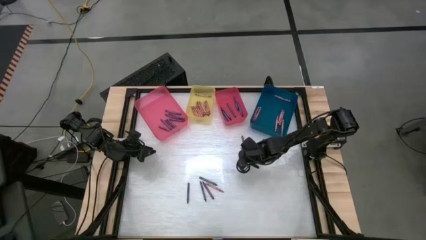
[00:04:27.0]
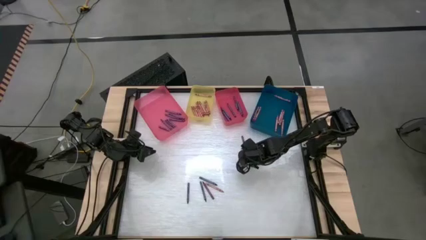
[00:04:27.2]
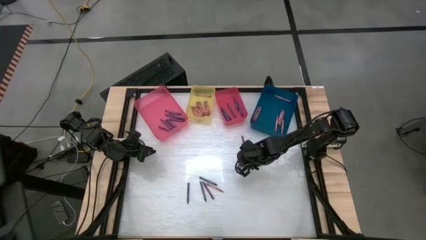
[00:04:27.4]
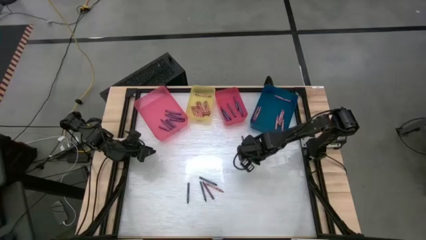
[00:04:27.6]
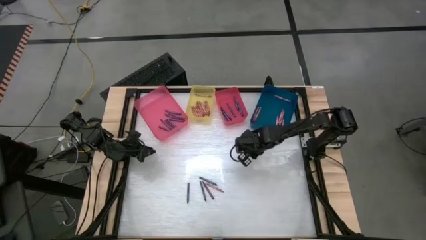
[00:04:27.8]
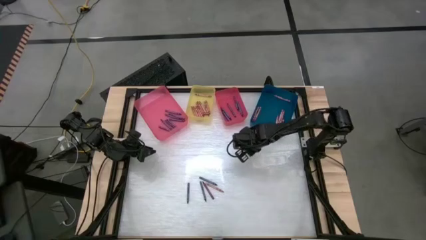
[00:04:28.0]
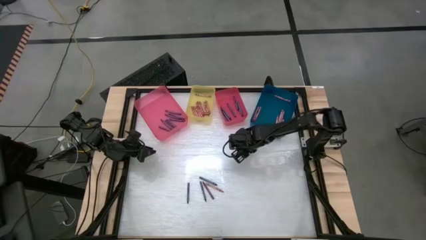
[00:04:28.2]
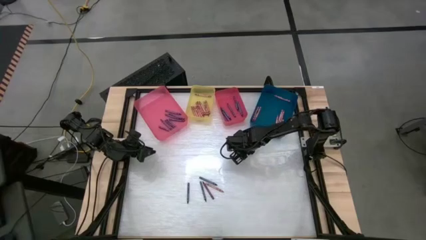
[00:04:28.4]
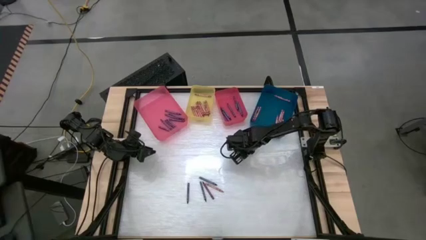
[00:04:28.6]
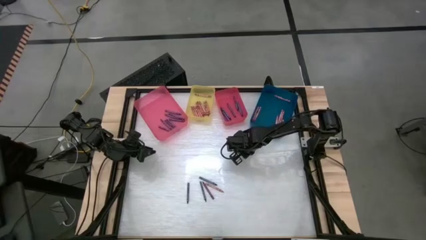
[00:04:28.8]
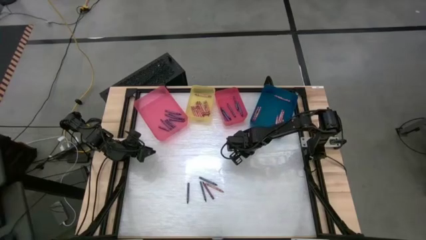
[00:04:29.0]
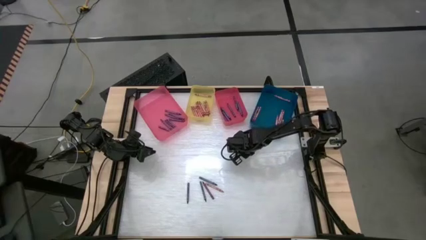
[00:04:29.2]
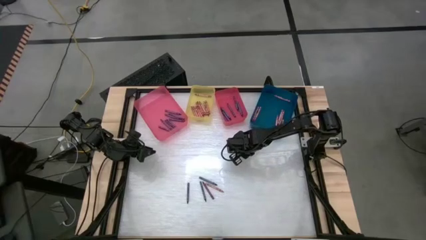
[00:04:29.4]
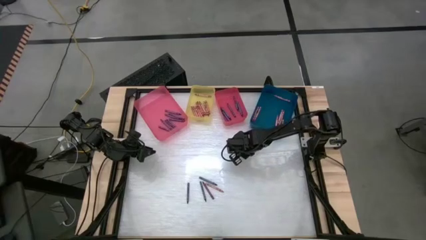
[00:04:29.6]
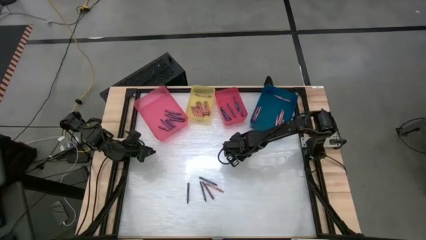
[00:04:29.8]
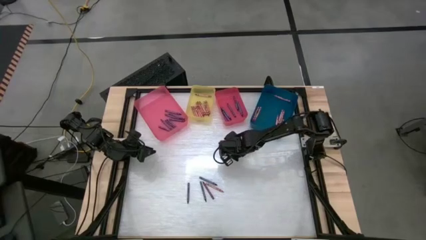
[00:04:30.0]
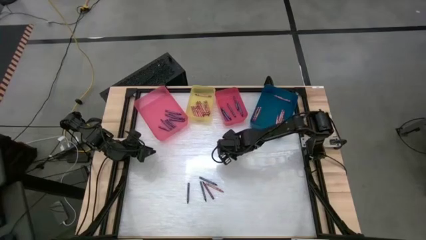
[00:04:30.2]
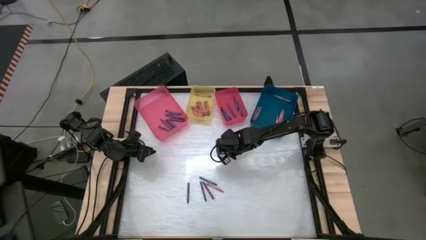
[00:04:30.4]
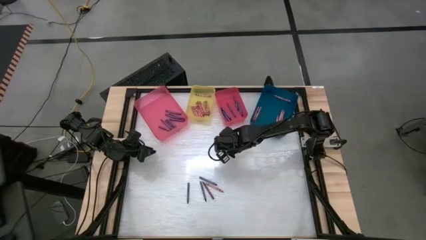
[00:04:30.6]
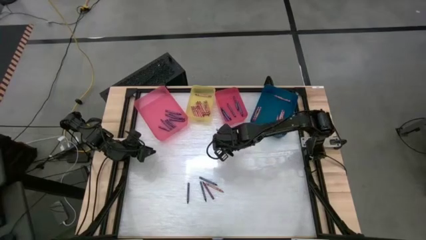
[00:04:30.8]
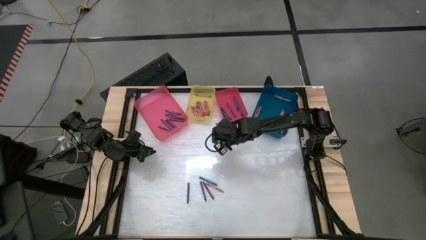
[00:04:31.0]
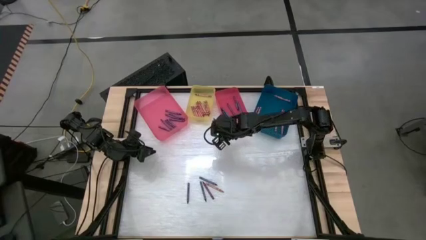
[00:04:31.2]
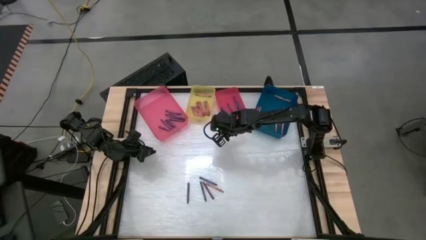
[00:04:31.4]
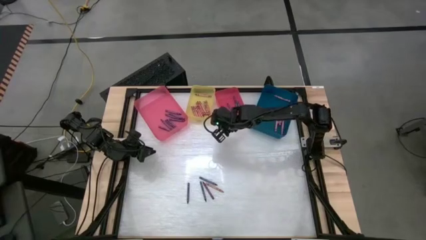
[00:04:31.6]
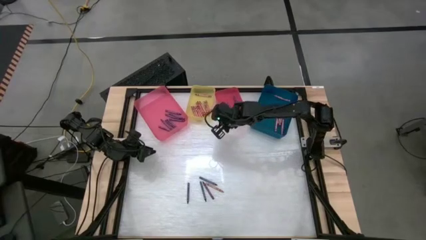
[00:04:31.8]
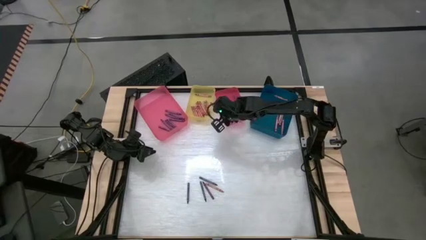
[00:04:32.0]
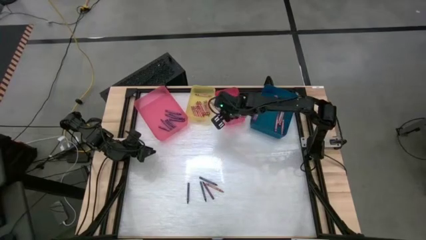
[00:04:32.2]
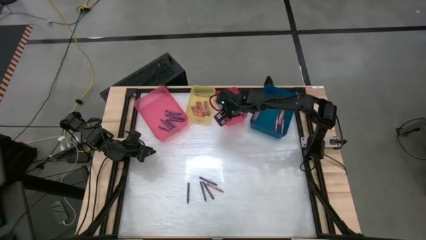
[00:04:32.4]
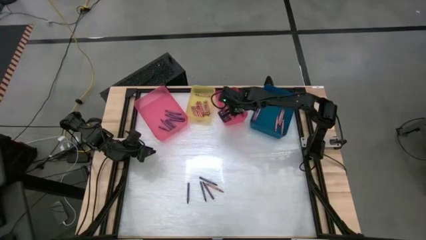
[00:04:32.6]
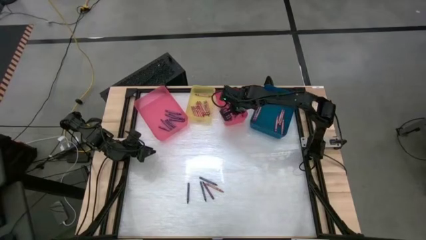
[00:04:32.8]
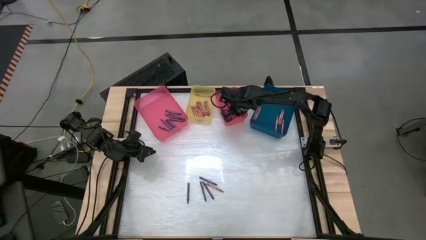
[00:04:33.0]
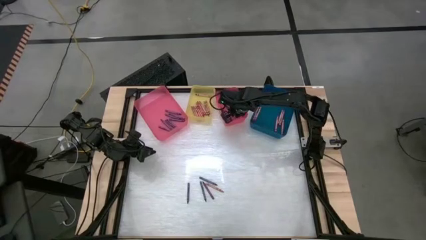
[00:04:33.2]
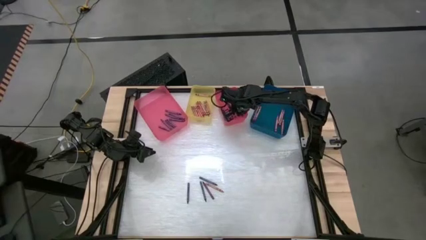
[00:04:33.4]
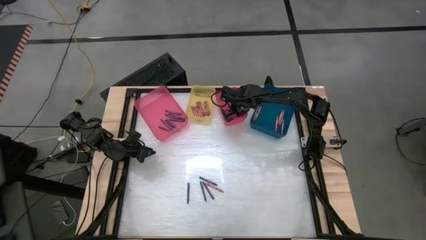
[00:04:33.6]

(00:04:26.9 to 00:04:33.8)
Task: Sort crayons
Put the blue crayon into the red bin

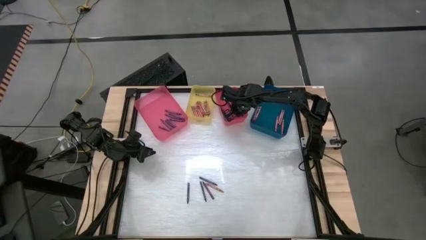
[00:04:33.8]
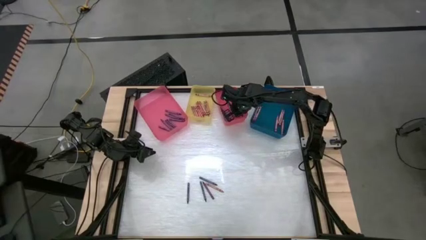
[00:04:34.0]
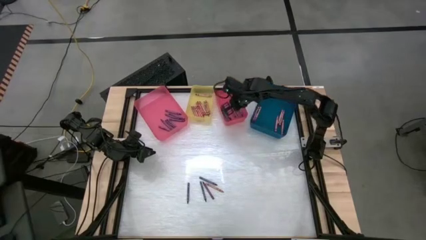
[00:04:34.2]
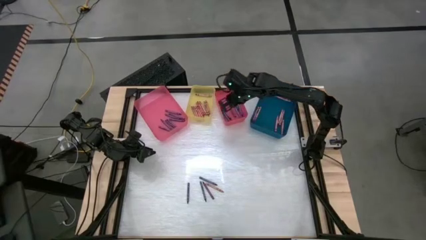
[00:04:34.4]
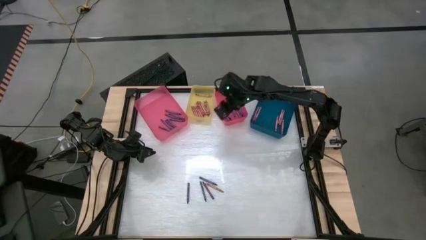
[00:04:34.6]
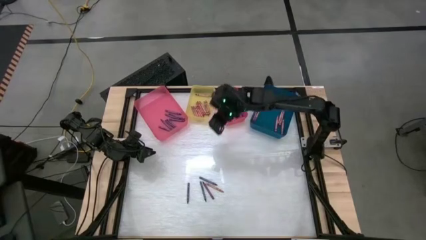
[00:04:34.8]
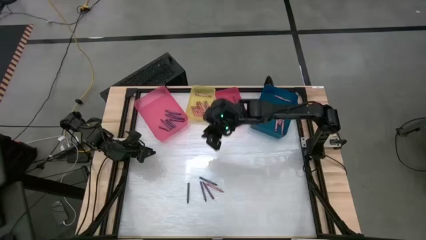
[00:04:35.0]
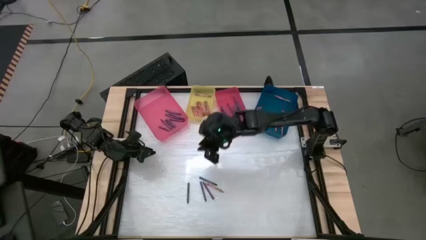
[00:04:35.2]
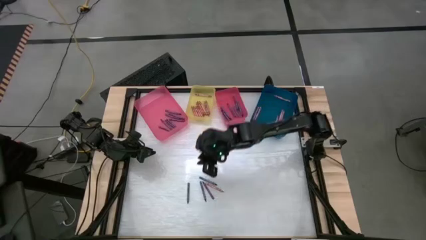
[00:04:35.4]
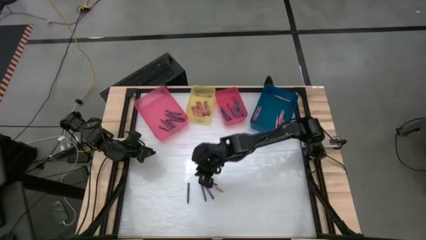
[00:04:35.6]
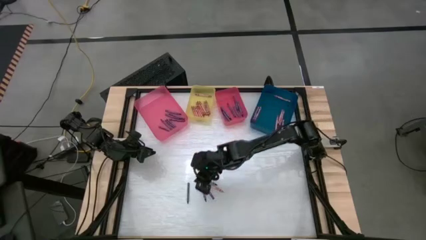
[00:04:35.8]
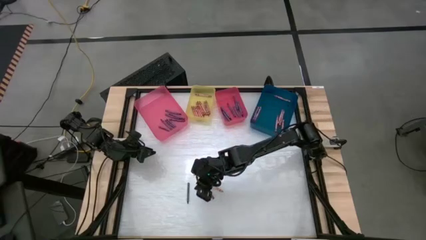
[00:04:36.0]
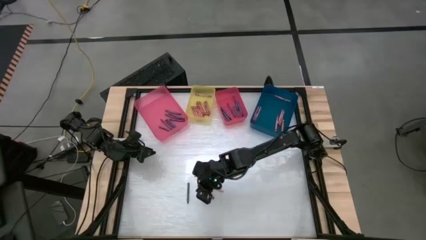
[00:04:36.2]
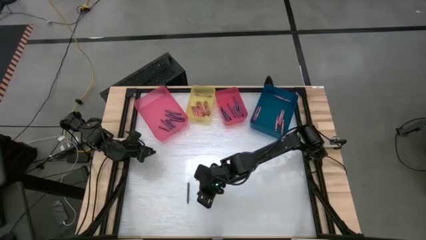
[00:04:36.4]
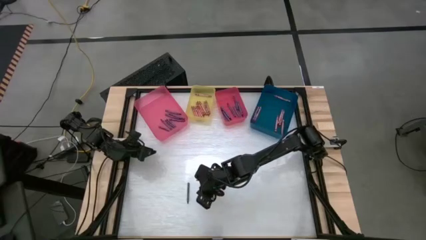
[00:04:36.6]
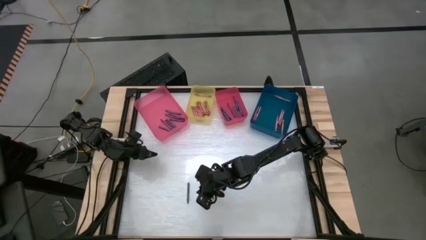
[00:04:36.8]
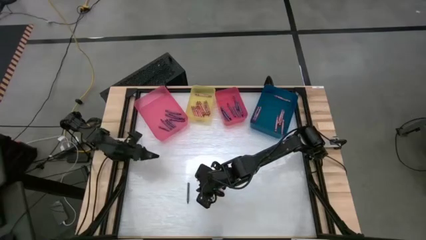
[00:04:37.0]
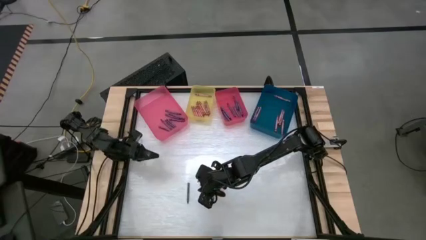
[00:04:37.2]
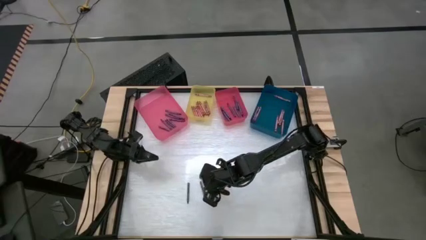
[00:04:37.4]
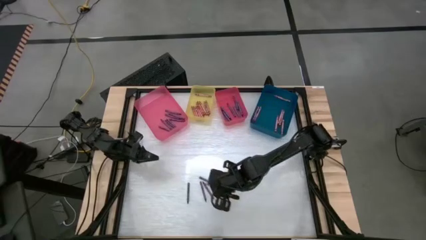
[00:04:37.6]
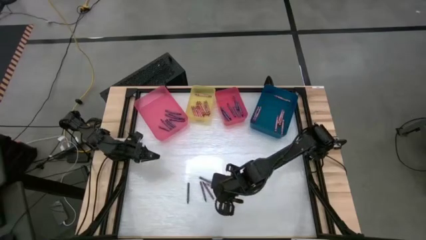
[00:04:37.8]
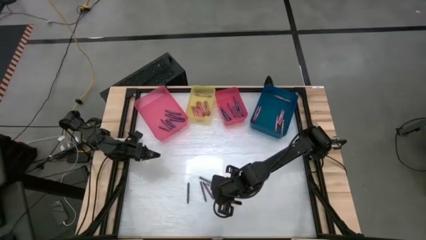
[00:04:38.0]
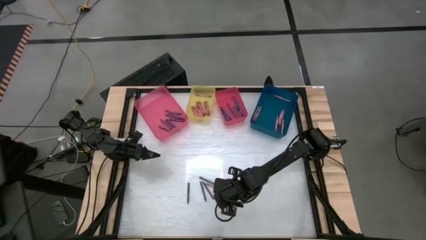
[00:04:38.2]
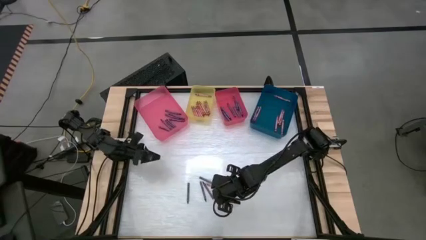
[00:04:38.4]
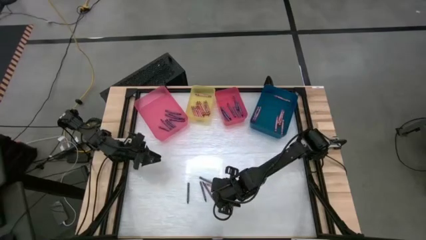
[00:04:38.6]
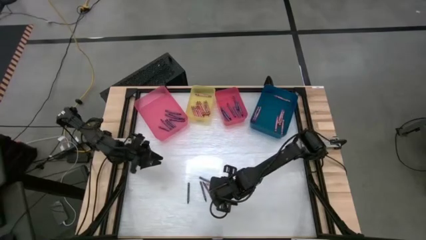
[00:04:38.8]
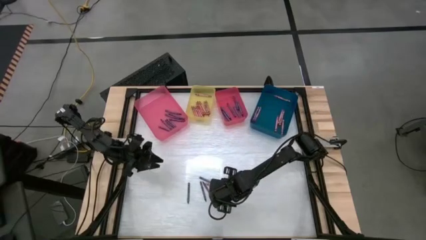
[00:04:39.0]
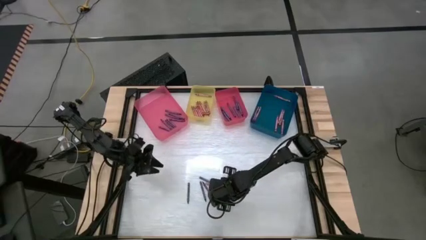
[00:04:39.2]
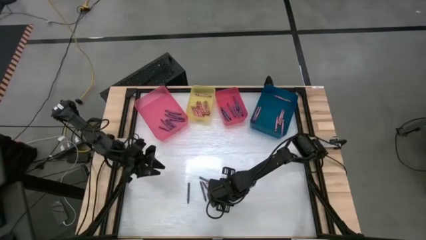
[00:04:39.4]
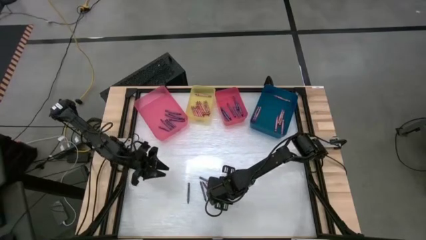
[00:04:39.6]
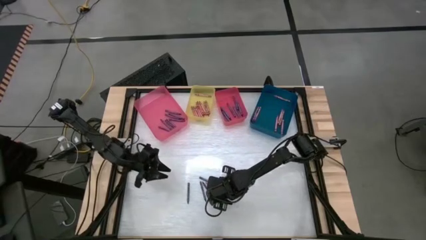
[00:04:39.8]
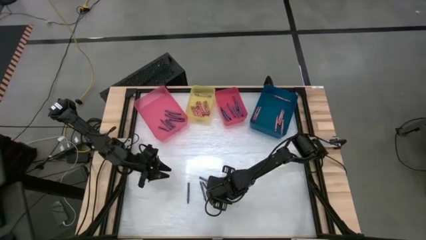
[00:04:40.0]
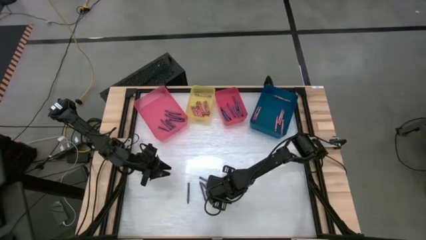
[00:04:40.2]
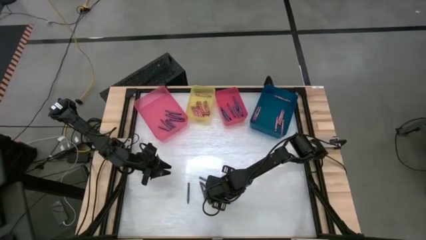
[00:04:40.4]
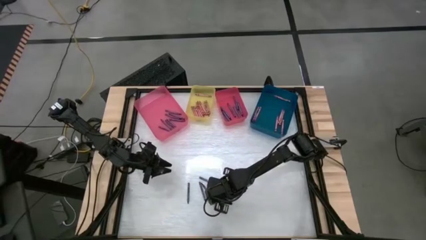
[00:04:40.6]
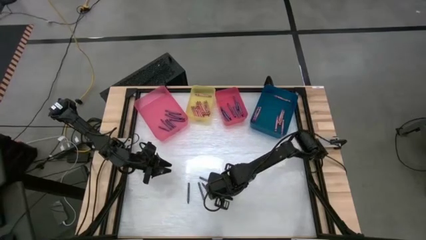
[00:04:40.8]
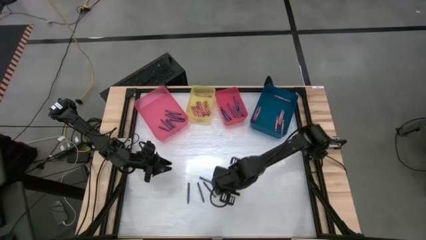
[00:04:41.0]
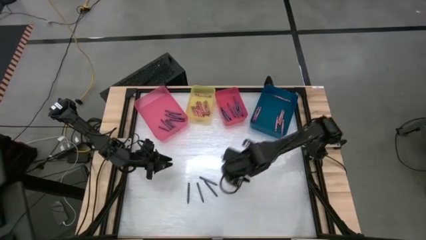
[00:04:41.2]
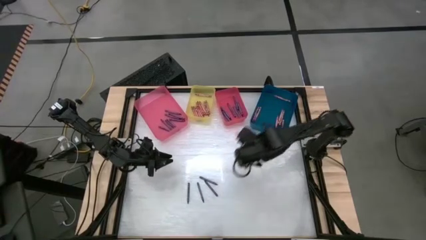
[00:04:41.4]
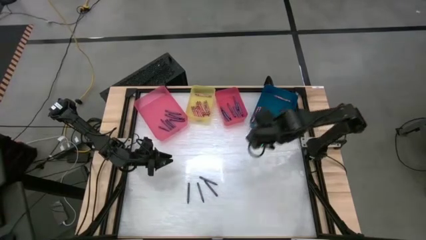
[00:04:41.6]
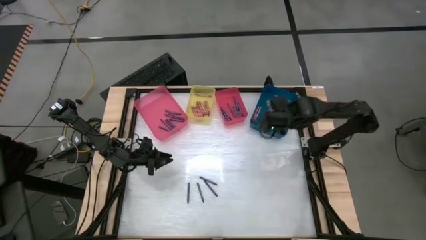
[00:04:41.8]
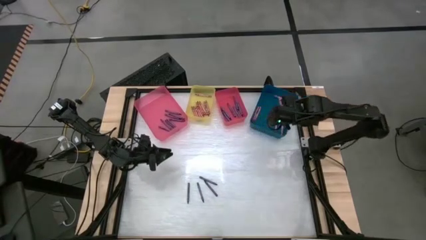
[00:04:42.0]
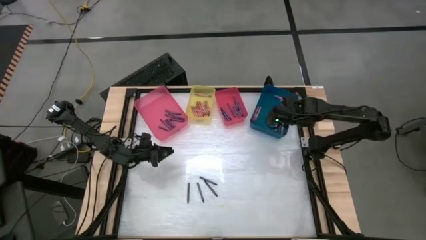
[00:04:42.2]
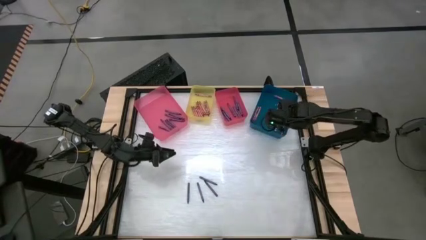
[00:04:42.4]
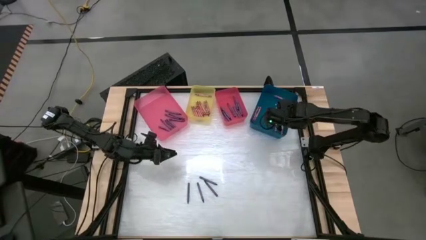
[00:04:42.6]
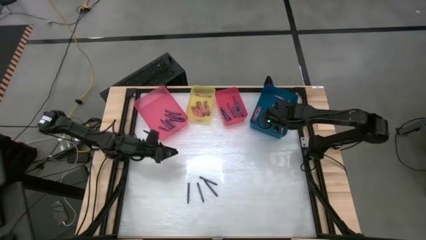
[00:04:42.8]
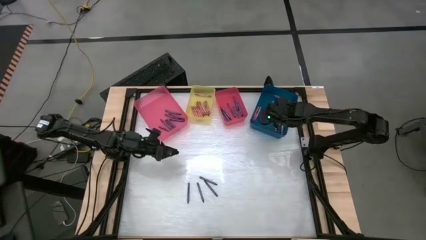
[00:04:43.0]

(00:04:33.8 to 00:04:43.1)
Put the pink crayon into the blue bin
